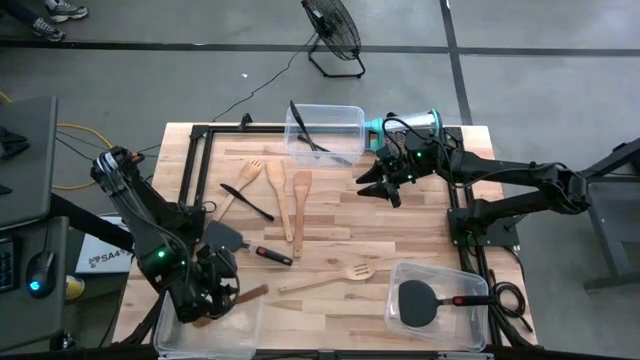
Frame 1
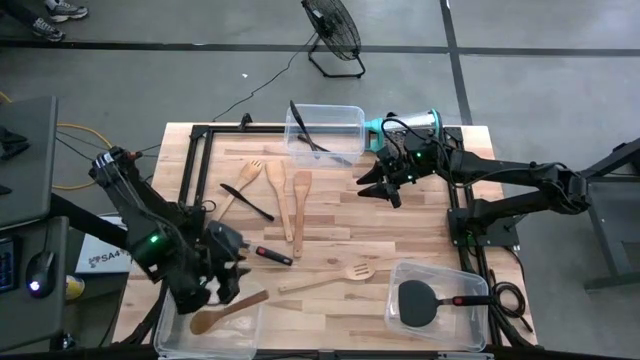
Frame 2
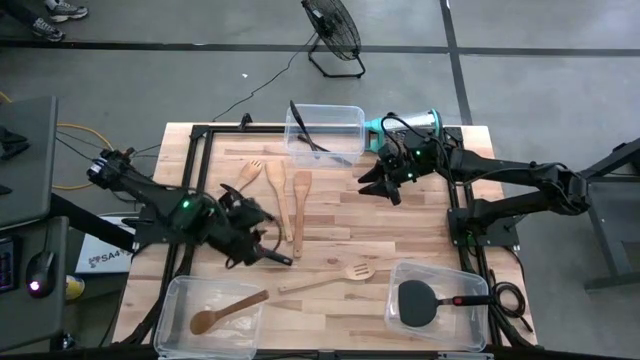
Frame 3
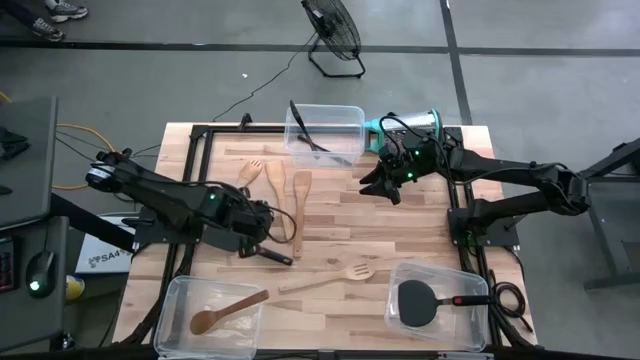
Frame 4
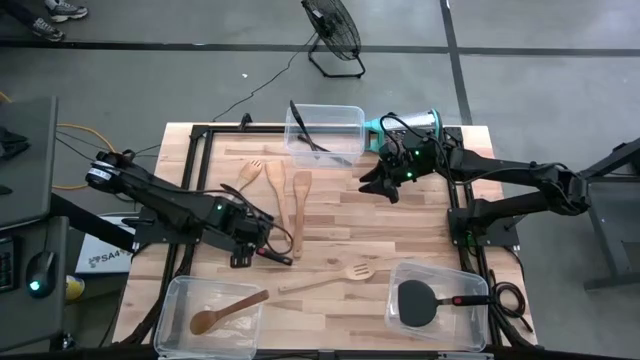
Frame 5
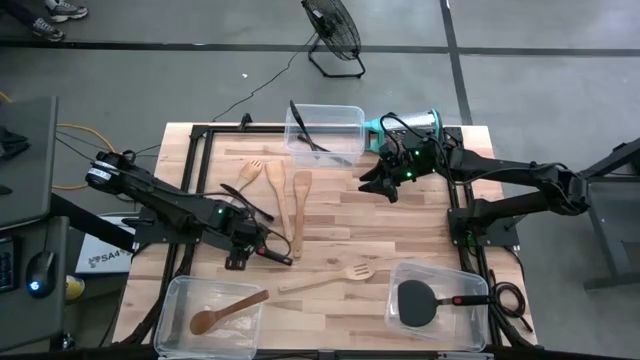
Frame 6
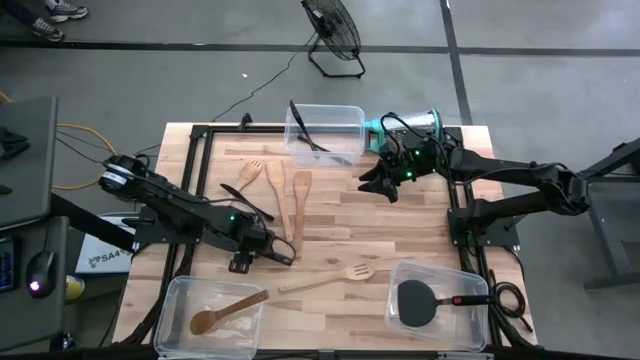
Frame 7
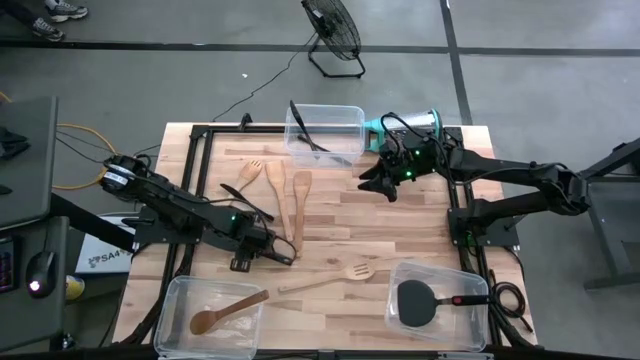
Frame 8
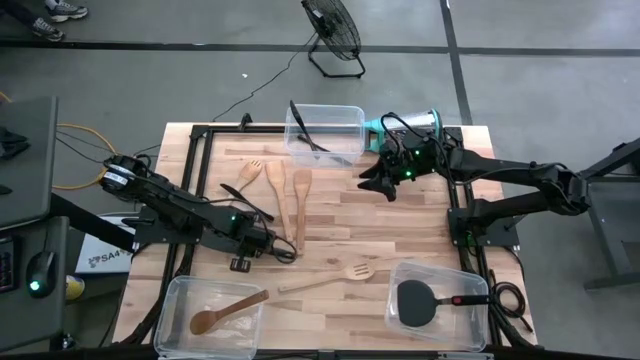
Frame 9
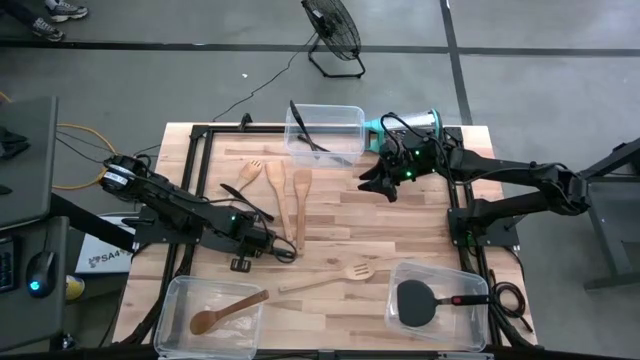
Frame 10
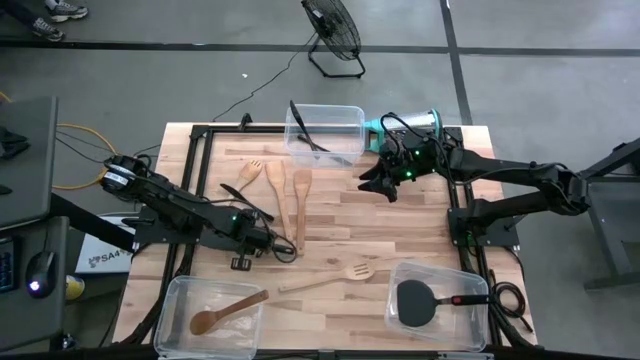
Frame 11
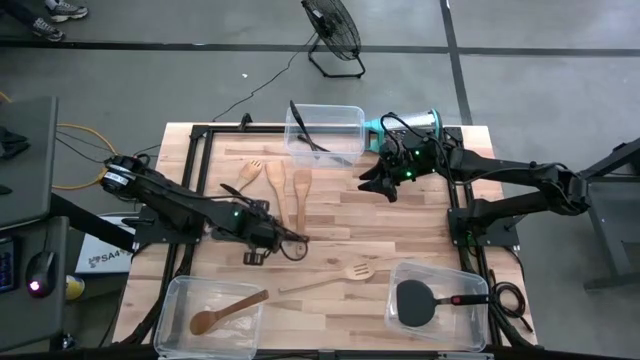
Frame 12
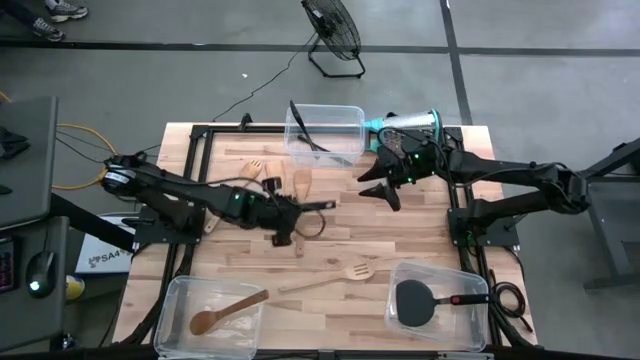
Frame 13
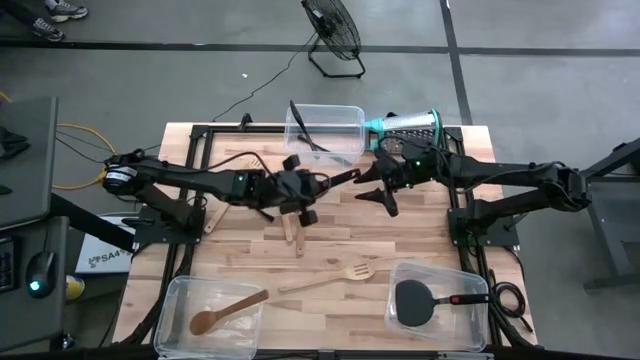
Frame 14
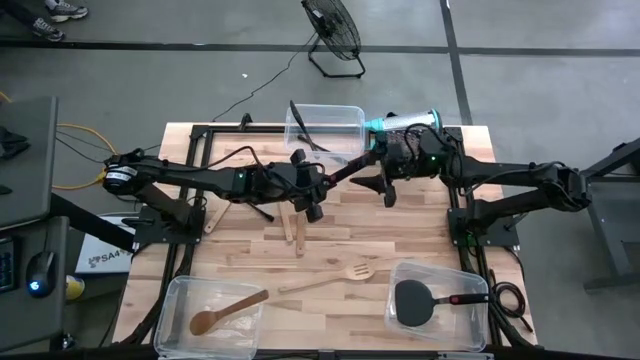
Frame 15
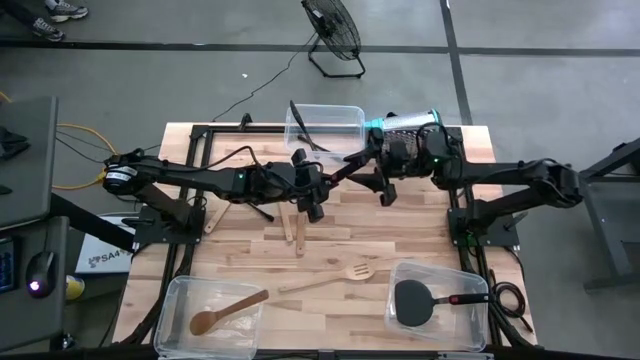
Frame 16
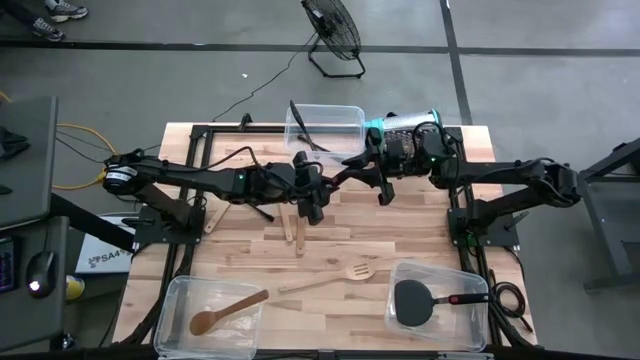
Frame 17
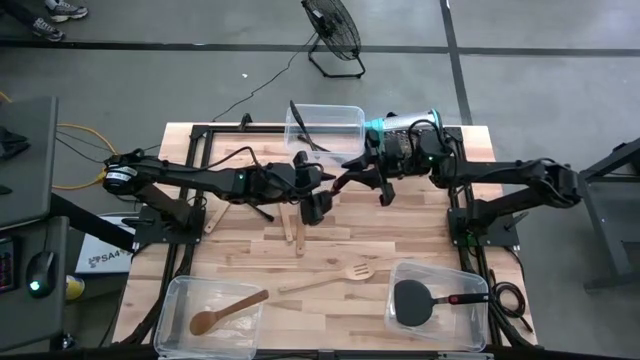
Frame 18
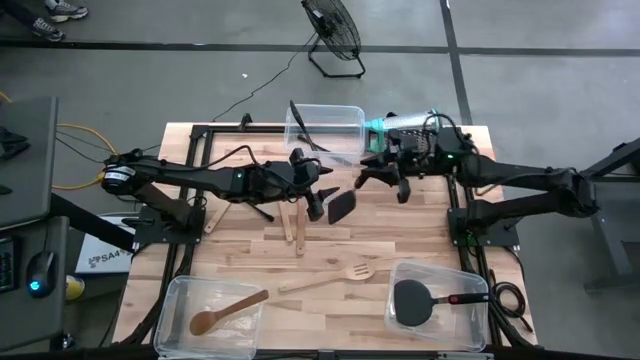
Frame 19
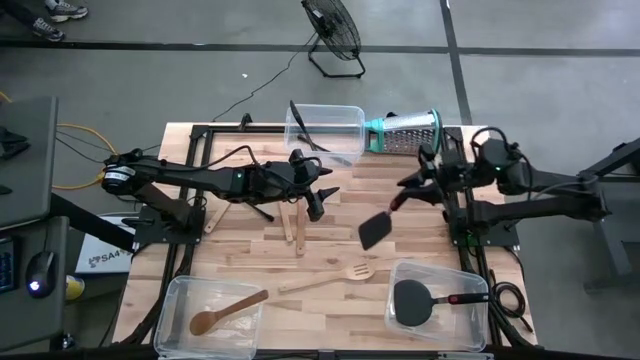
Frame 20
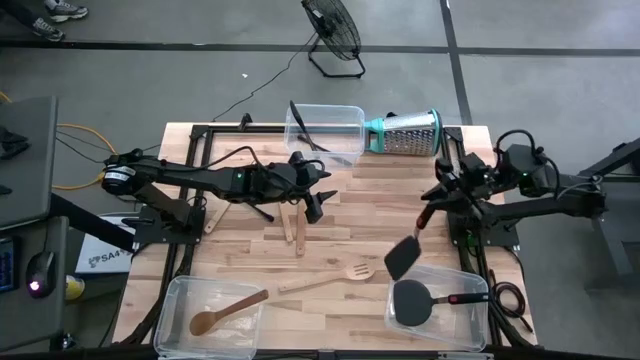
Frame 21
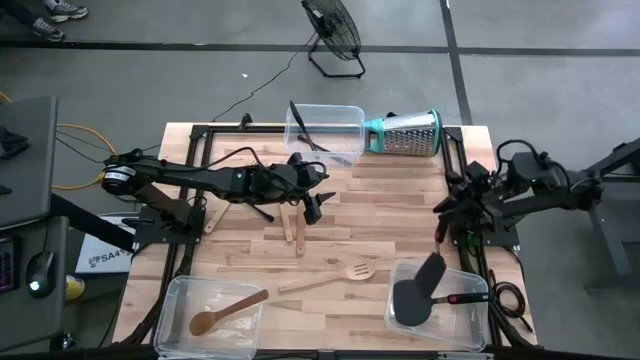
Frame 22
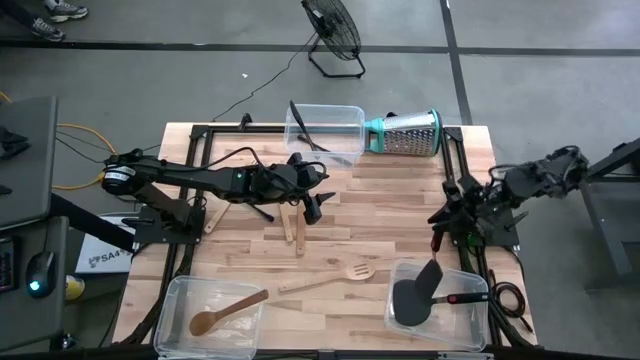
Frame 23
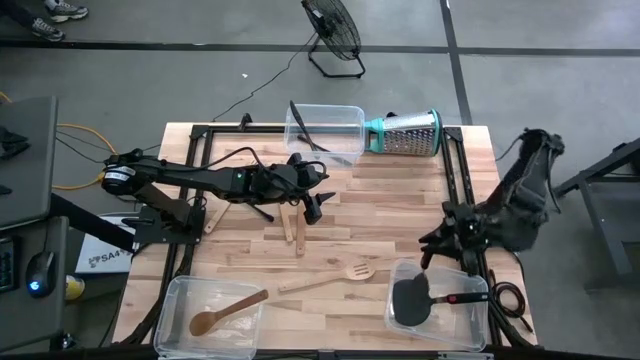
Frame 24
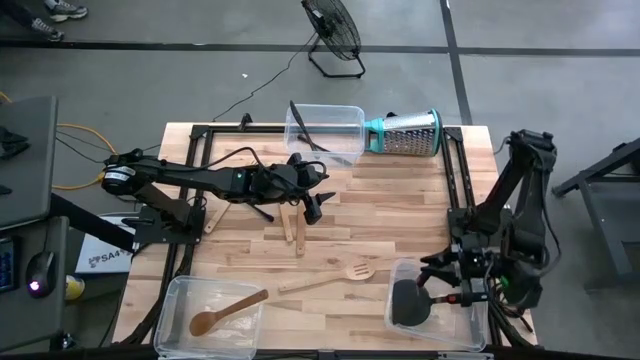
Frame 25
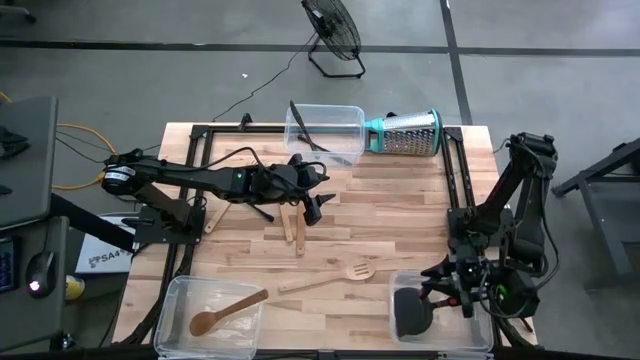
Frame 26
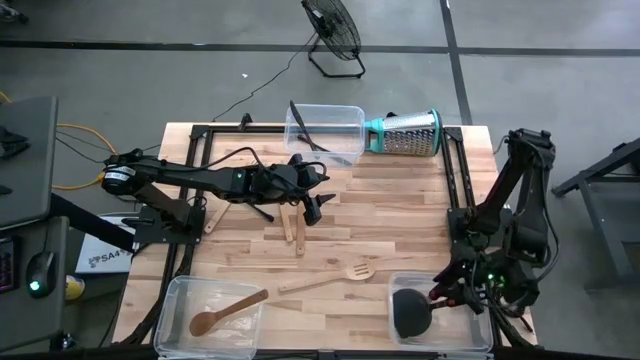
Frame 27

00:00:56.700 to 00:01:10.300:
Task: Pick & Place Kitchen Items
Put the black spatula into the bottom right transparent bin

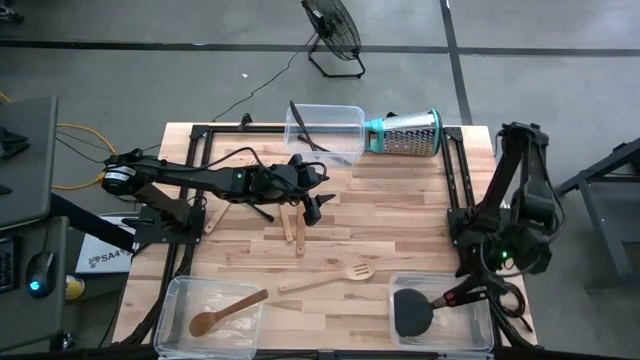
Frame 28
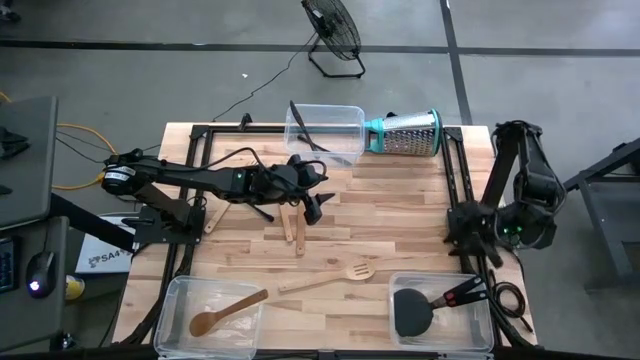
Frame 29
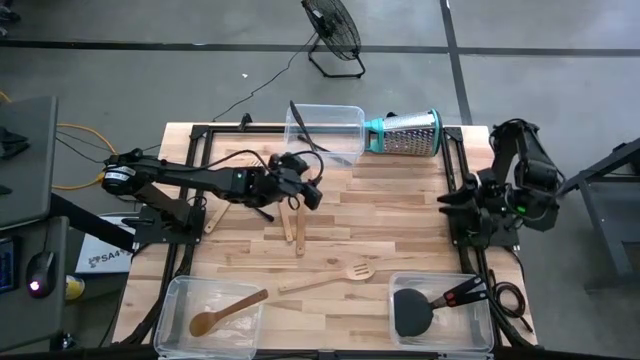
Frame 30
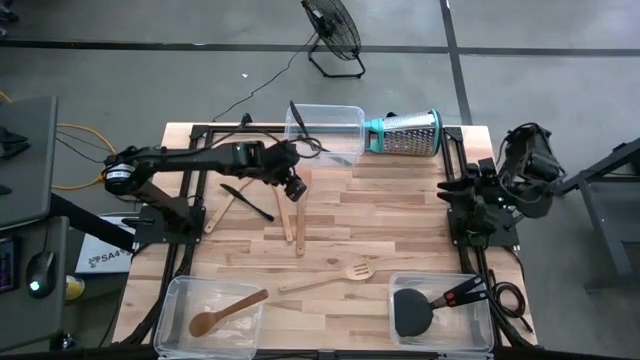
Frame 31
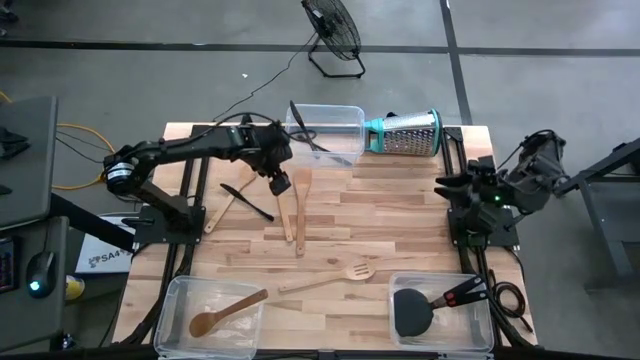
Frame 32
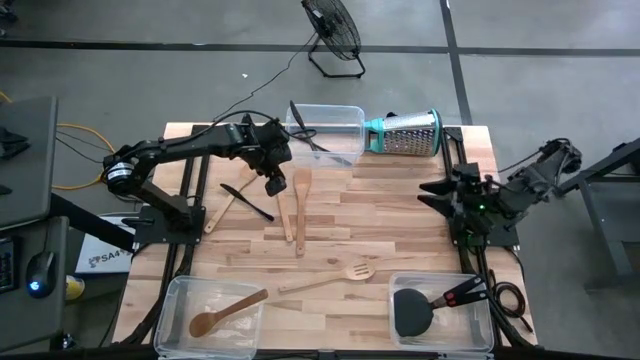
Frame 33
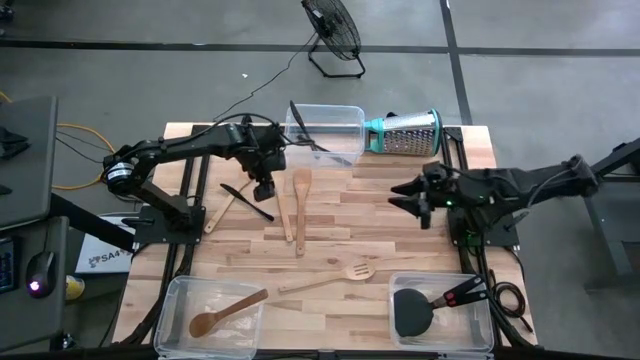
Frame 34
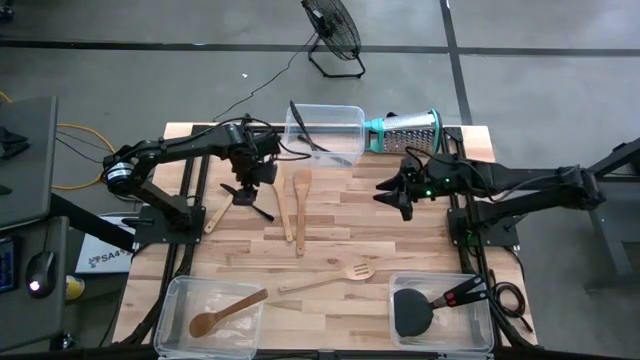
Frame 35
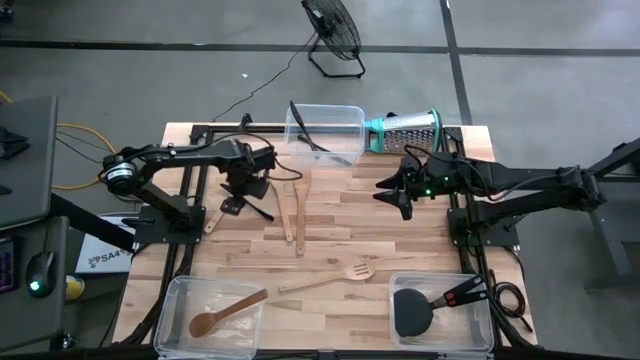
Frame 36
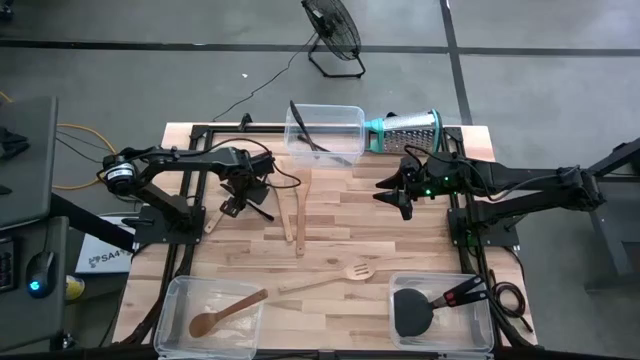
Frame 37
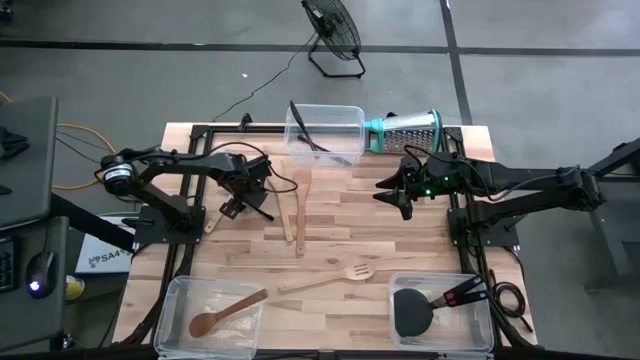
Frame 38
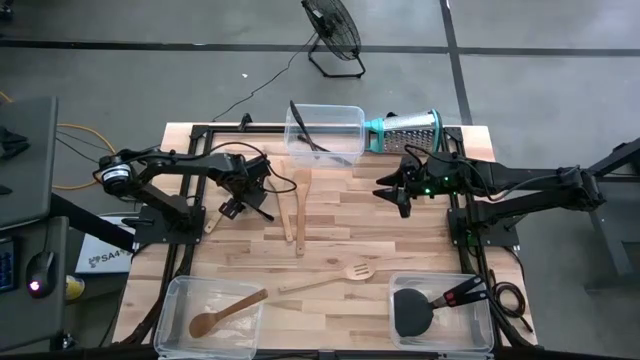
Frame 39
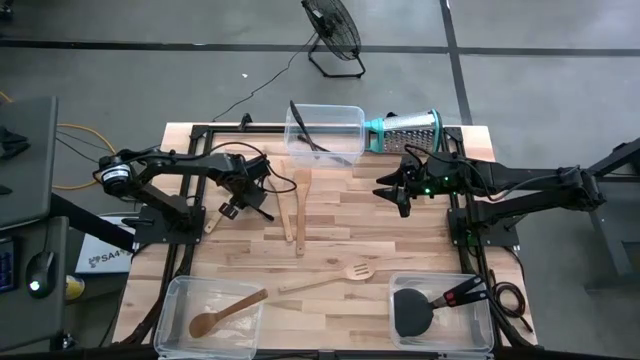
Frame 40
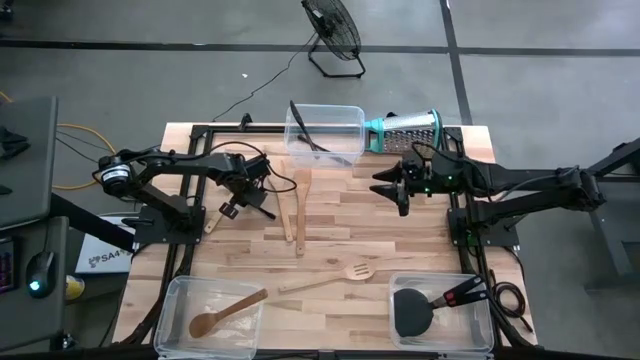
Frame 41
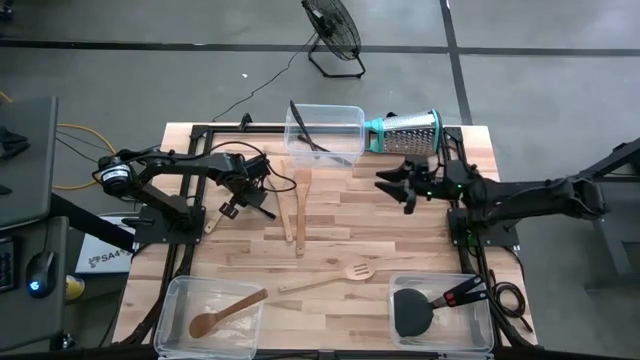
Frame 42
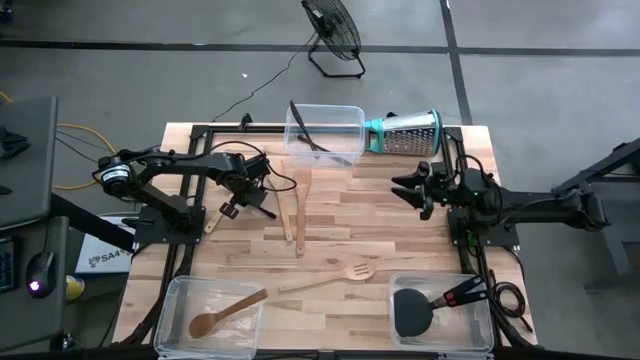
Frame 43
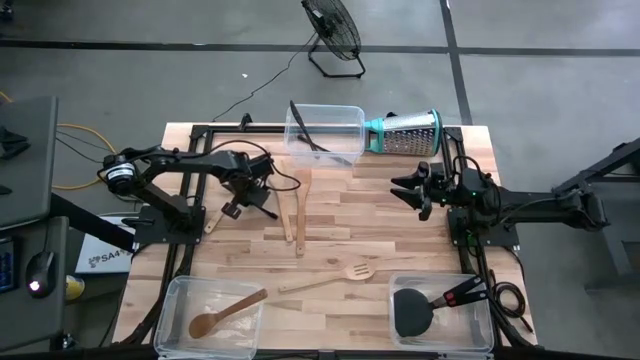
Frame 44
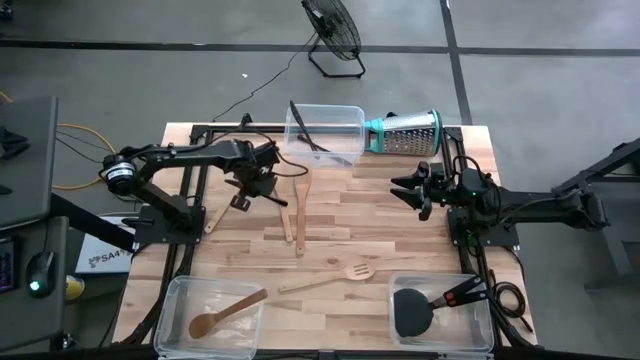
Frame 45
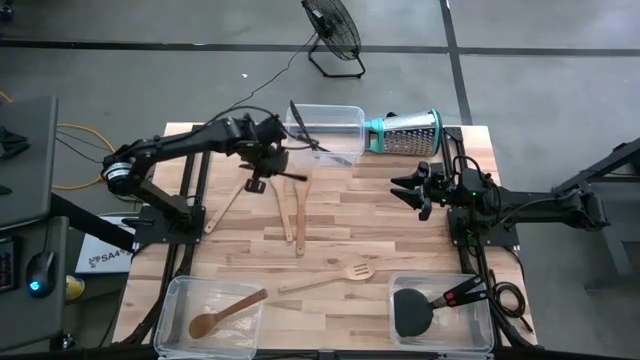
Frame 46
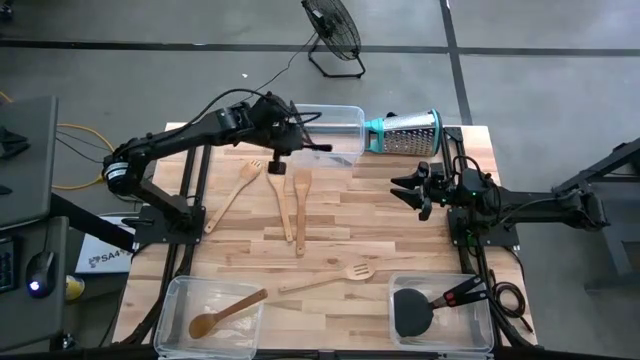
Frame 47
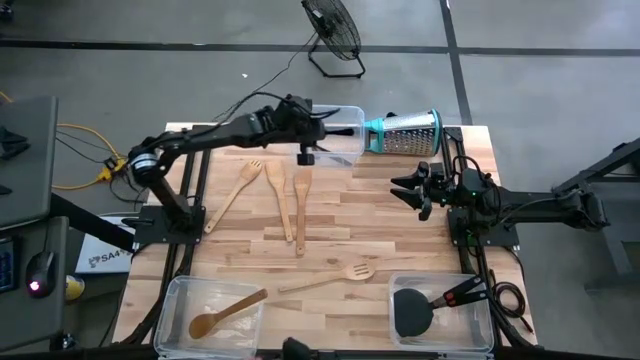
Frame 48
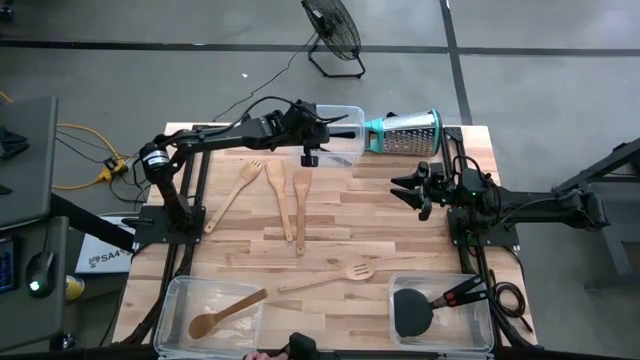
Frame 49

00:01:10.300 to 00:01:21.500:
Put the black table knife into the top transparent bin
